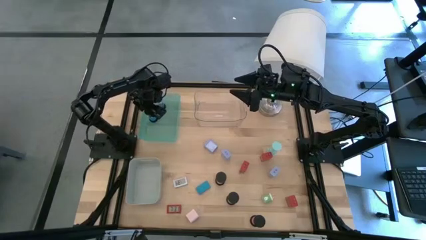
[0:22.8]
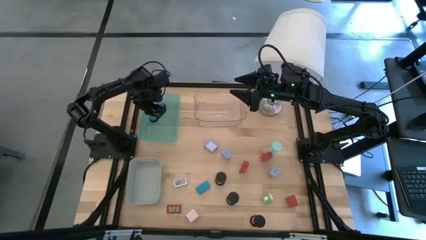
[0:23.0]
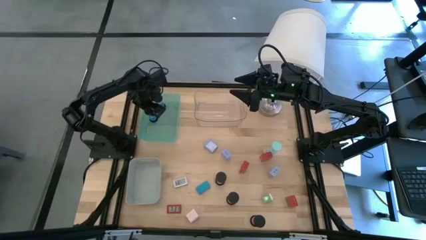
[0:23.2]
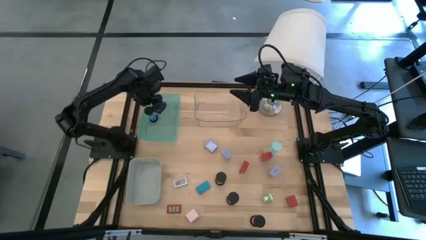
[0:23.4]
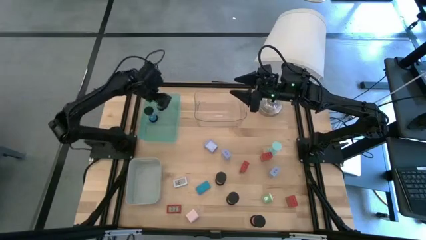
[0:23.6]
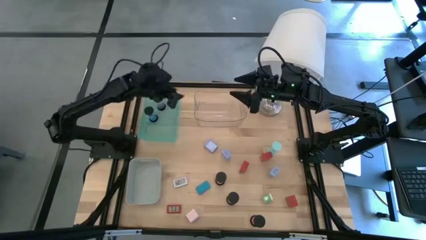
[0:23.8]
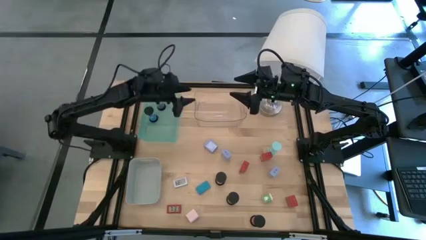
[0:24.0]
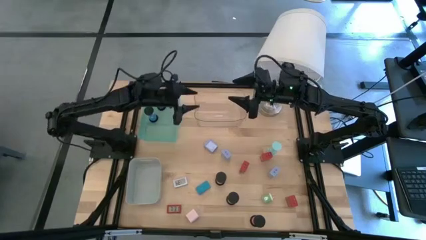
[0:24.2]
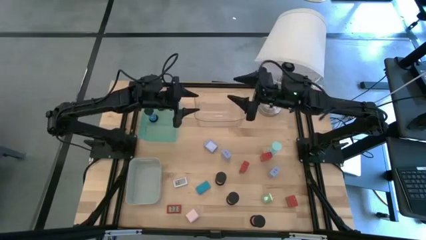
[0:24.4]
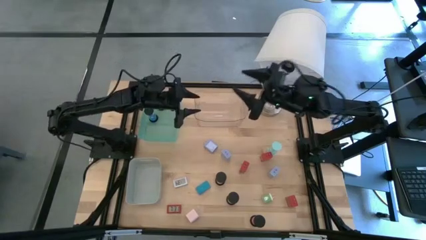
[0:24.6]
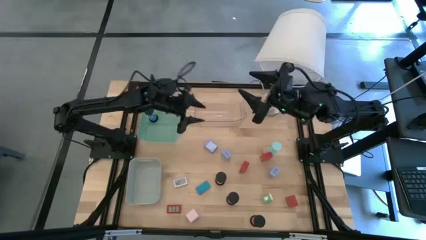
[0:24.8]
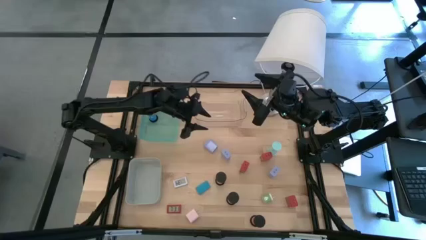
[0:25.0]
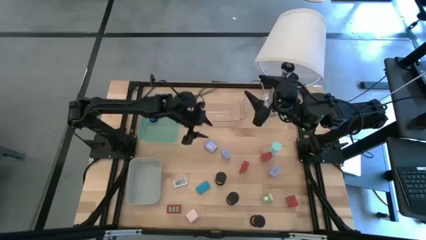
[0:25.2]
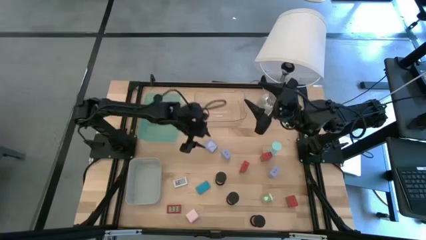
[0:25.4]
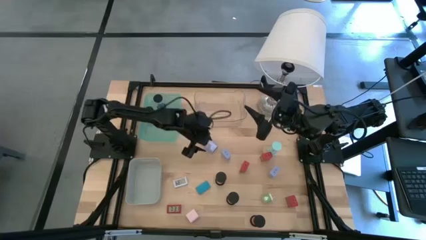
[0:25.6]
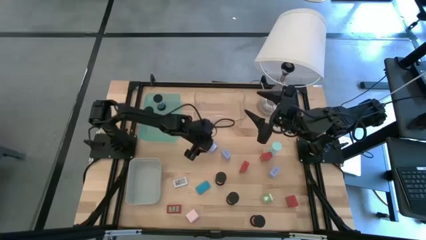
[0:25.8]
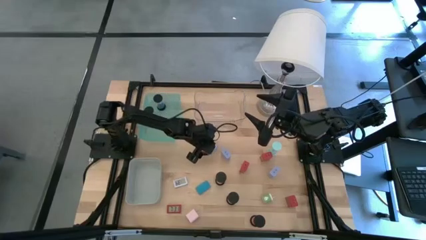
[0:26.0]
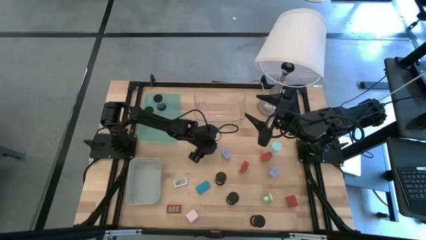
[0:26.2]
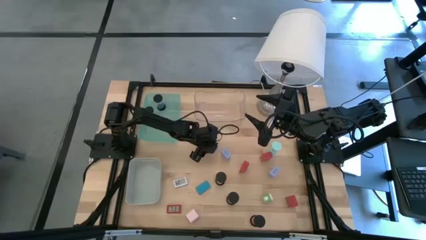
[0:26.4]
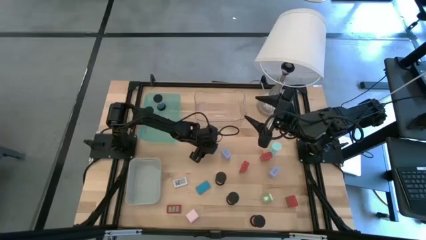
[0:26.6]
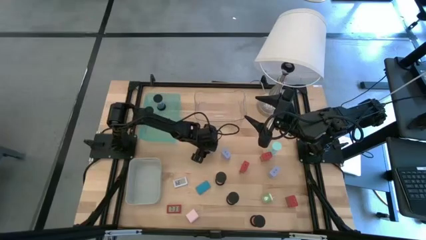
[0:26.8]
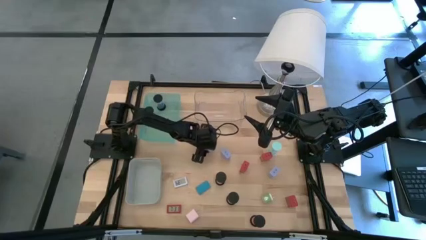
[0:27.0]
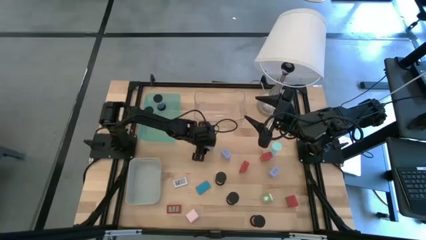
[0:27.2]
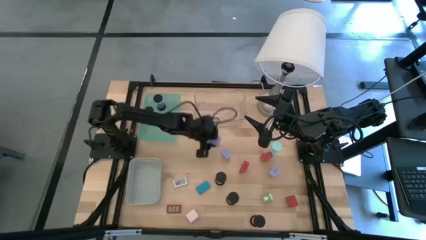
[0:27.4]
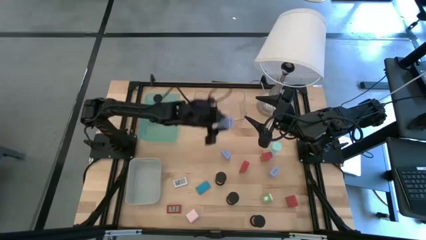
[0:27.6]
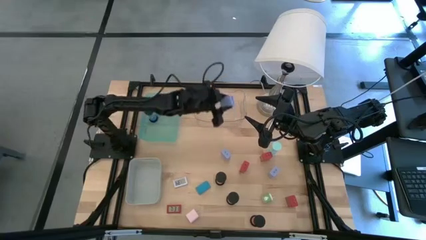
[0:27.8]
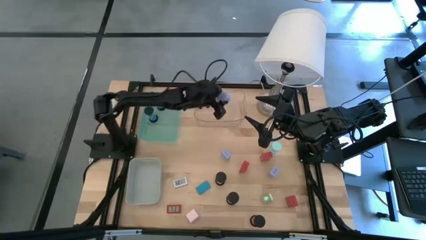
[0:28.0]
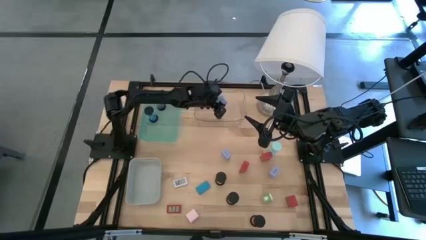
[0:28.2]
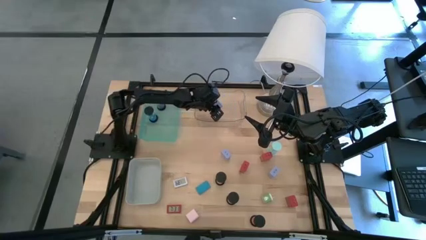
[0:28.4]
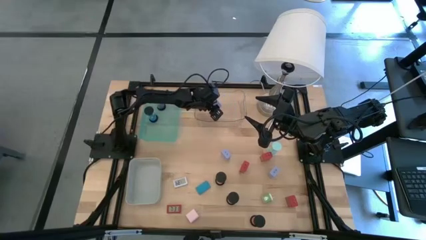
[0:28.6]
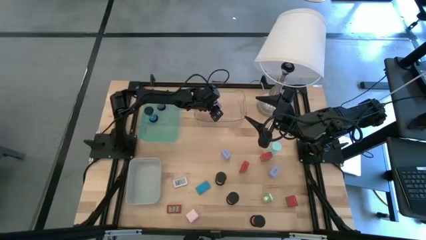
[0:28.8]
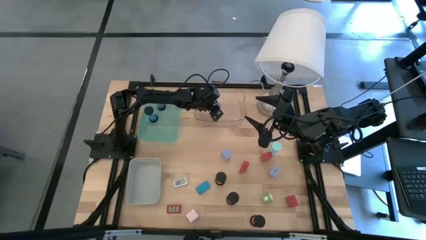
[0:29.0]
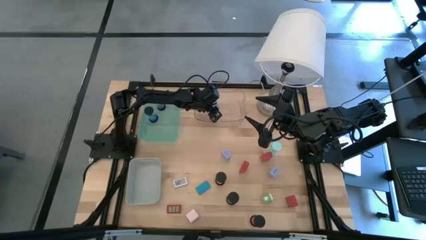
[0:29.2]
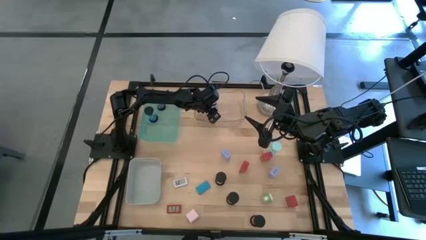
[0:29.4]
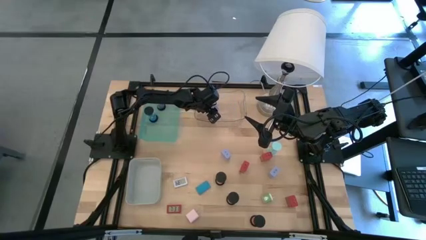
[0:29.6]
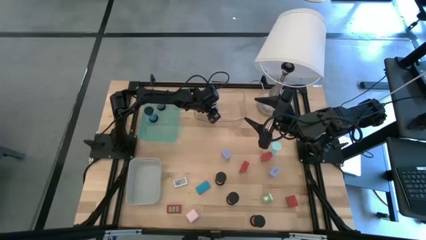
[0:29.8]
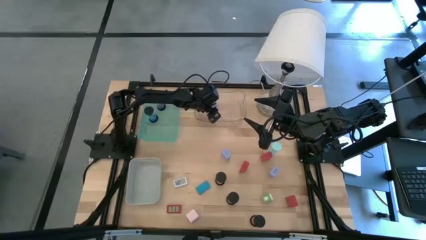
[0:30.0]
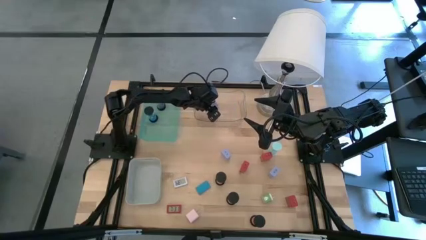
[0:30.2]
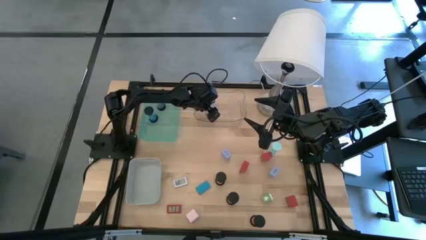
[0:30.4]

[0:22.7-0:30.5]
Task: Pick & Place Office items
Put the top left blue charger adapter into the transparent bin

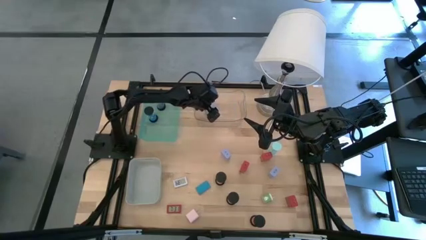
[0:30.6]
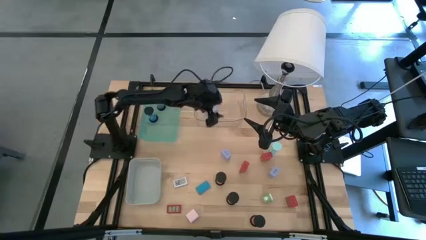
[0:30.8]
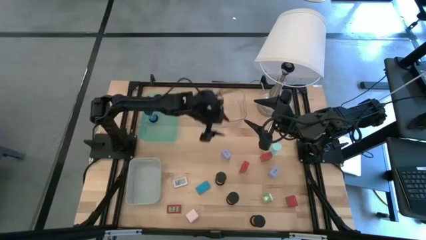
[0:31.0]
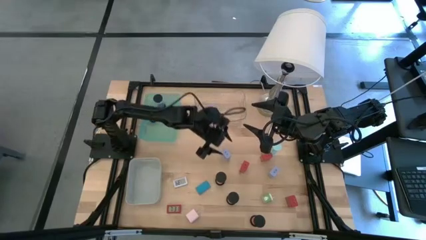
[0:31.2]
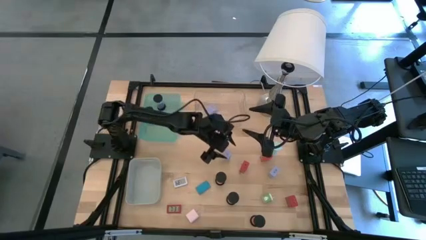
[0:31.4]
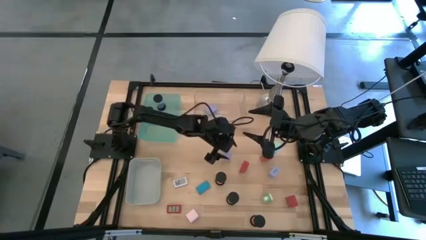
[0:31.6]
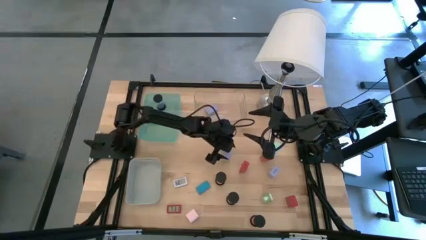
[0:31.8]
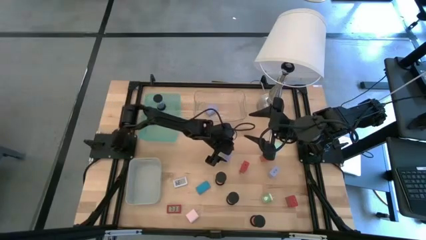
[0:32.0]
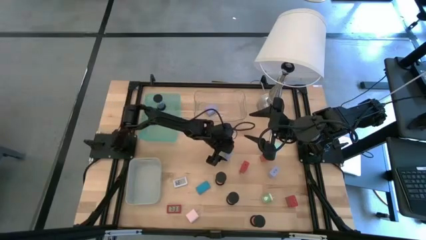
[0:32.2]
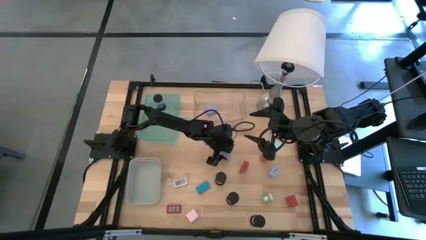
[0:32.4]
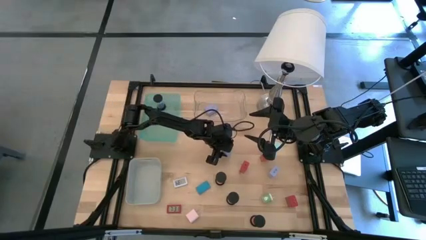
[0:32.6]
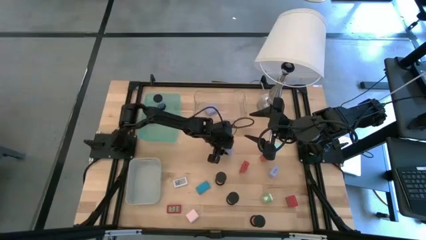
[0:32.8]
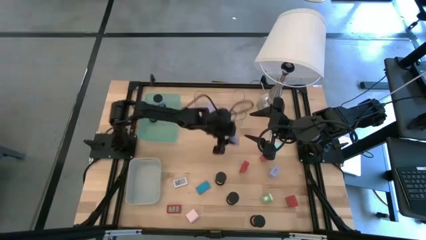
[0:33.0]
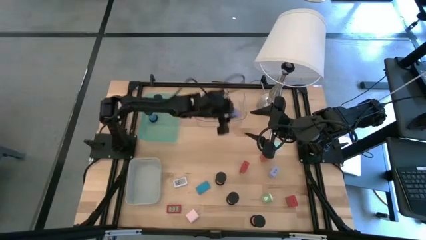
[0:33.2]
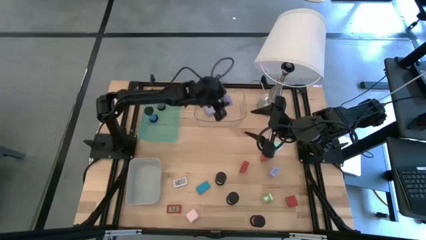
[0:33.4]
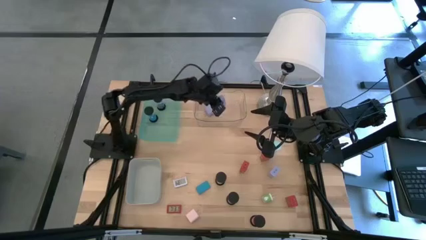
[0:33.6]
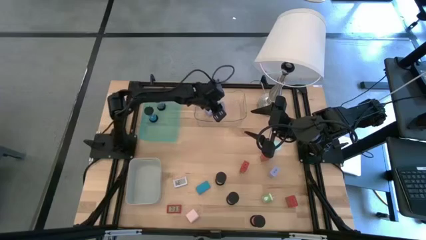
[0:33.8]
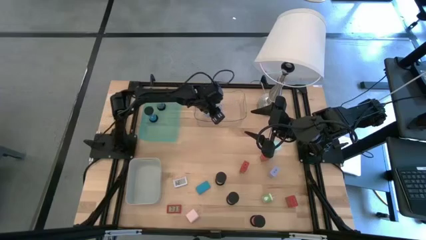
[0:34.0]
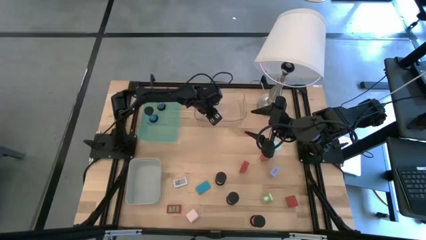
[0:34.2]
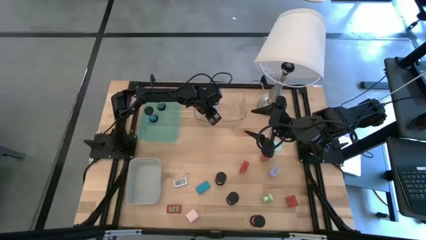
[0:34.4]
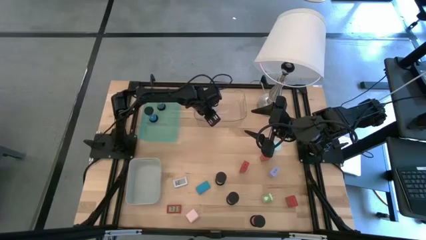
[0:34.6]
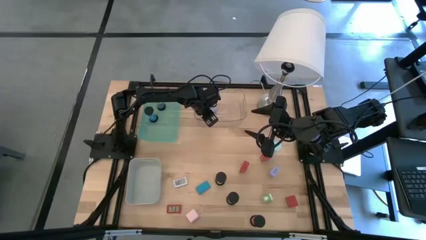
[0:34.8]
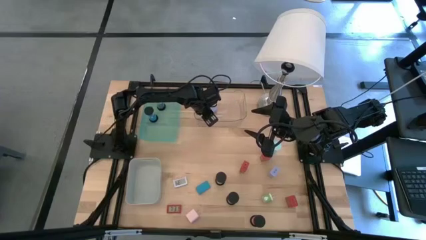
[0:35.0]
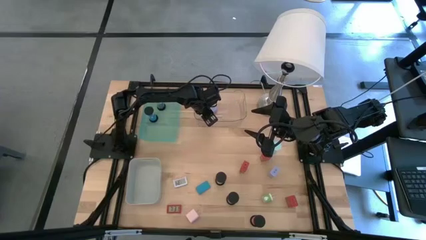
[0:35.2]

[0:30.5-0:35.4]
Put the left blue charger adapter into the transparent bin

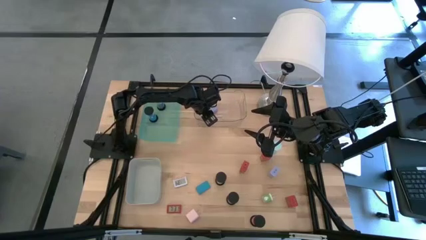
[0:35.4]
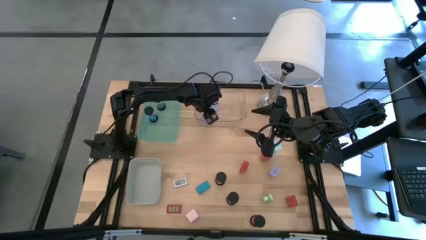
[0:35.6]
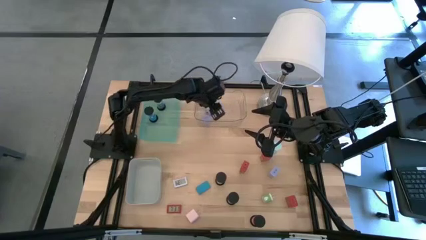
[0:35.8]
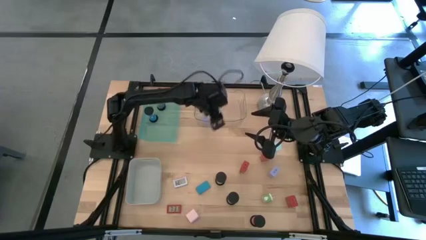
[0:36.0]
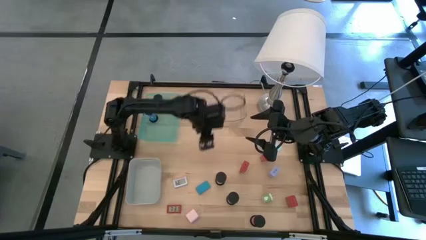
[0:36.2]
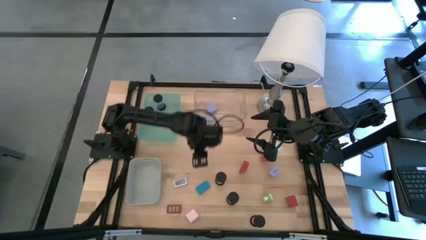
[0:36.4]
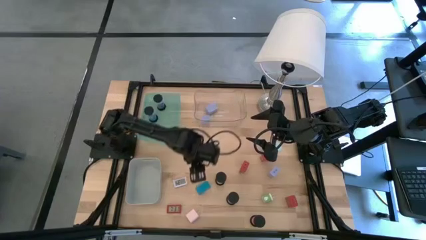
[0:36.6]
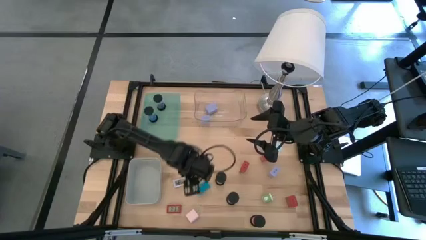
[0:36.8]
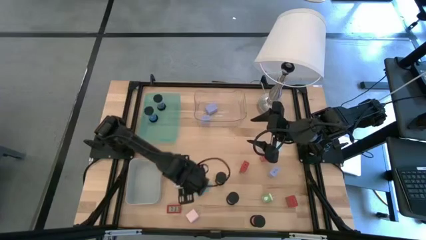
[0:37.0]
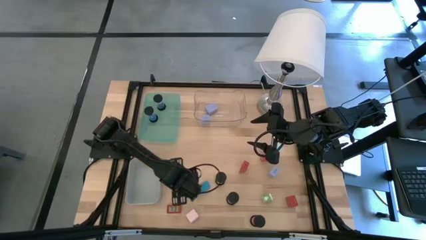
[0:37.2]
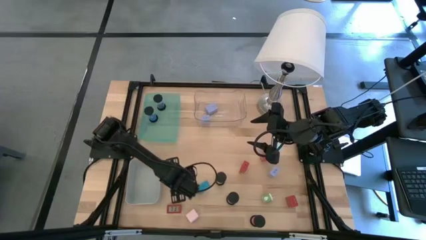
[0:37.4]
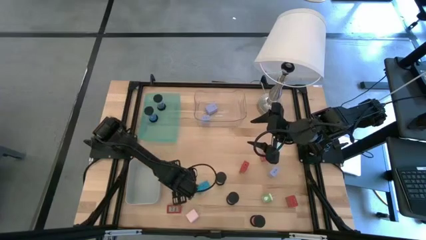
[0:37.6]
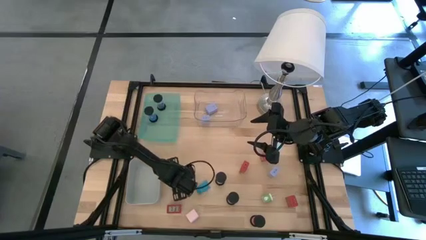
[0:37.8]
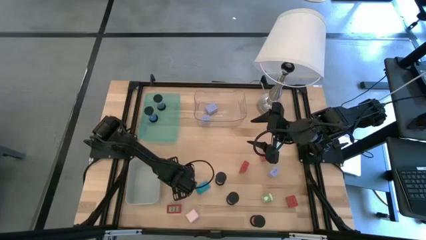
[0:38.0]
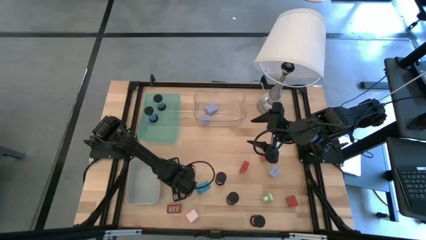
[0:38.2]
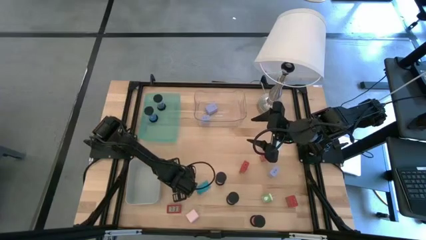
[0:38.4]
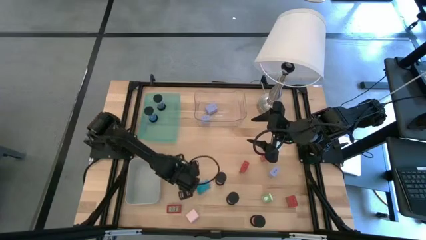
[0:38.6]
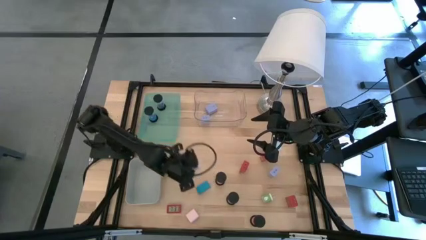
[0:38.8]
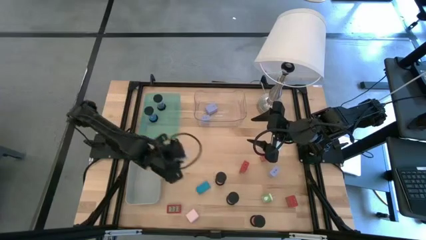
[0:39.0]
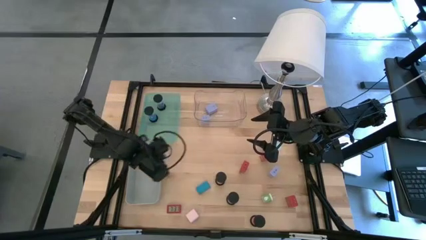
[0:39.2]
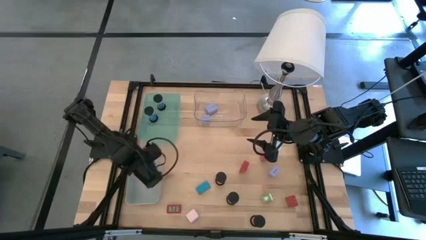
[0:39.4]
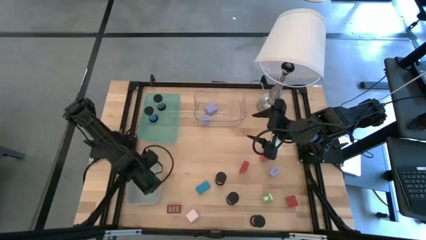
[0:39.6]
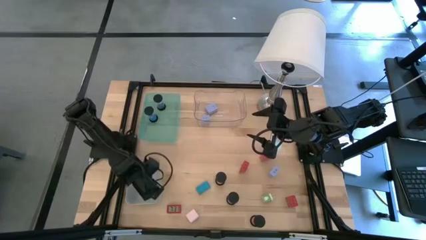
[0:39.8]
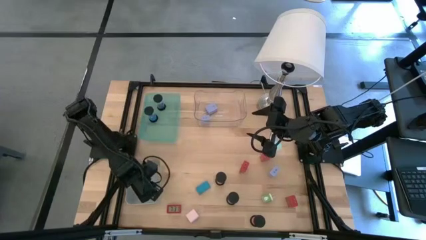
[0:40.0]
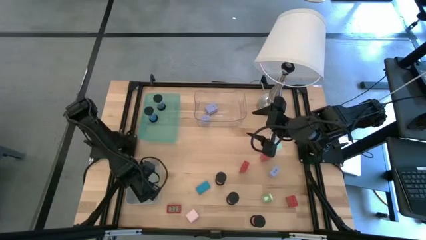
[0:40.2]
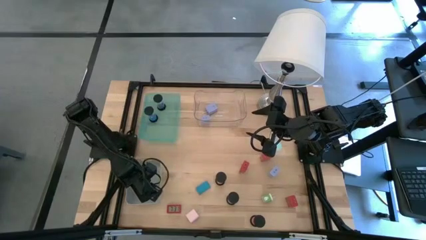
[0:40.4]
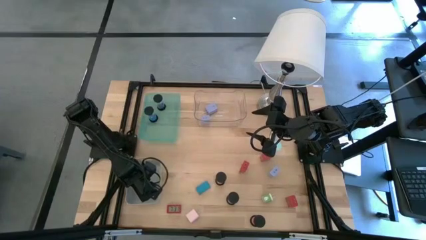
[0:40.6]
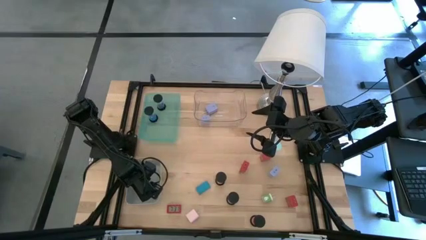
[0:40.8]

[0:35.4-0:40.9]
Put the white digital timer into the gray bin
